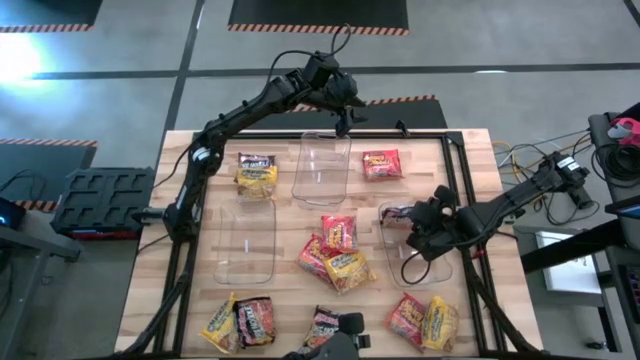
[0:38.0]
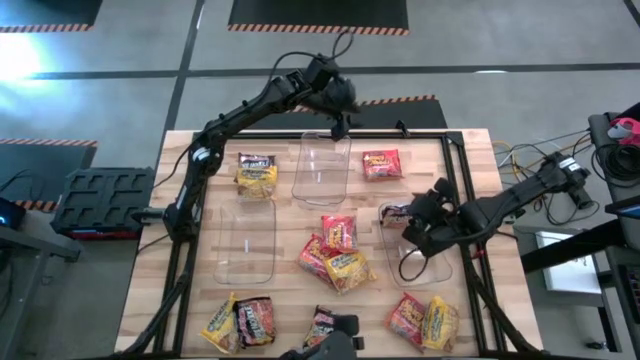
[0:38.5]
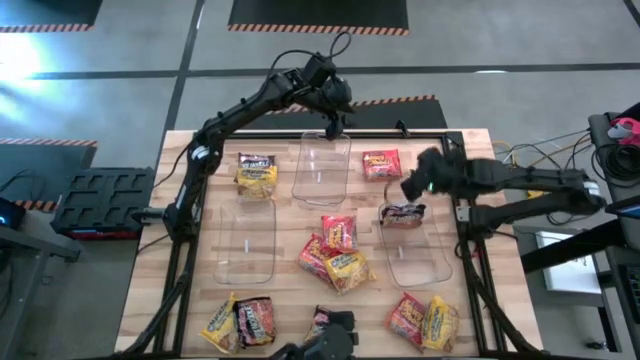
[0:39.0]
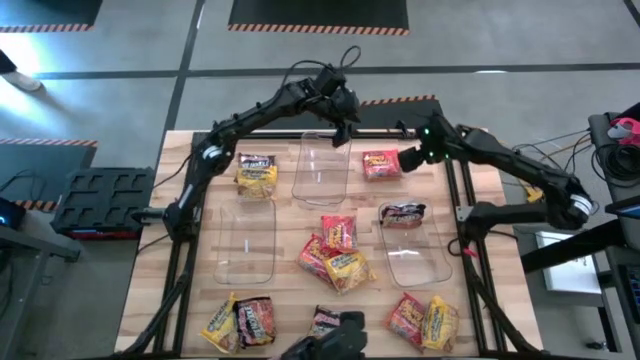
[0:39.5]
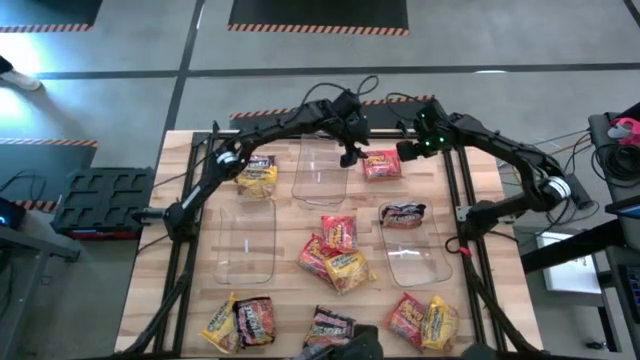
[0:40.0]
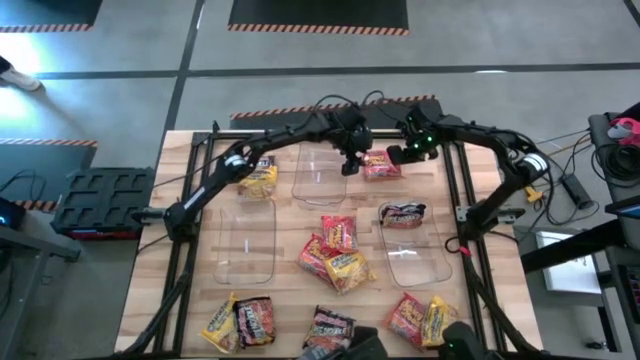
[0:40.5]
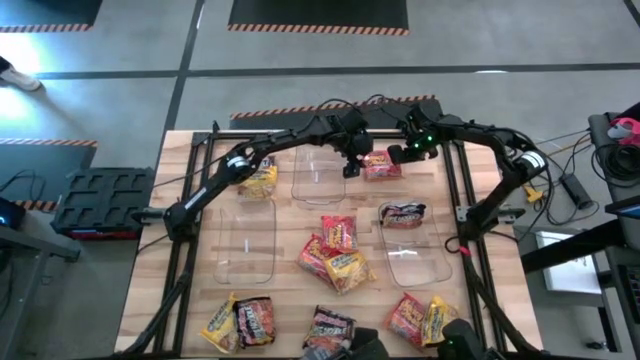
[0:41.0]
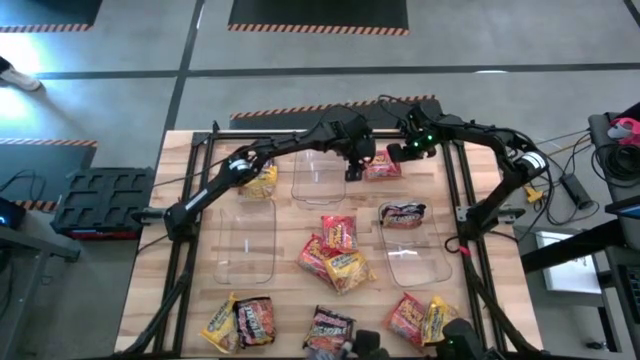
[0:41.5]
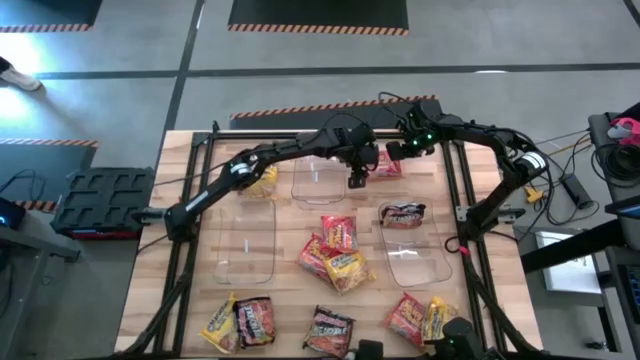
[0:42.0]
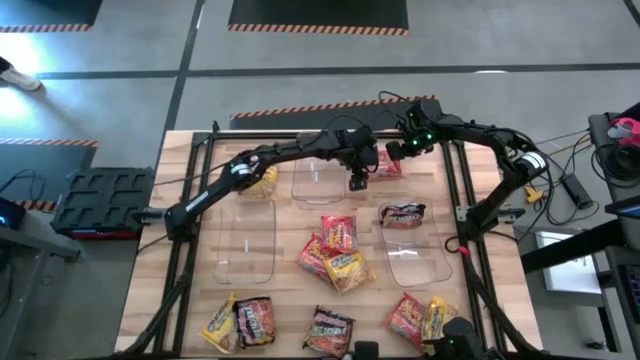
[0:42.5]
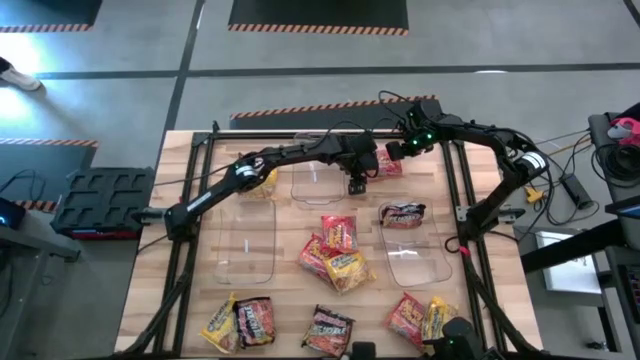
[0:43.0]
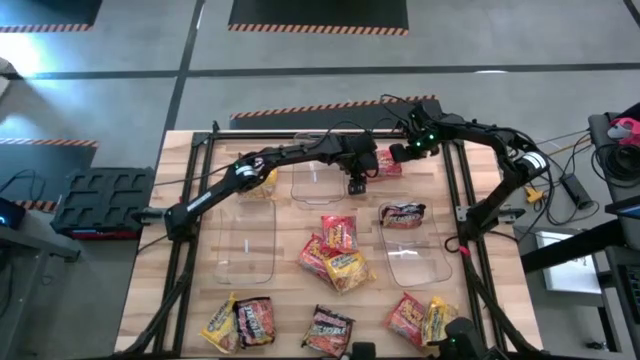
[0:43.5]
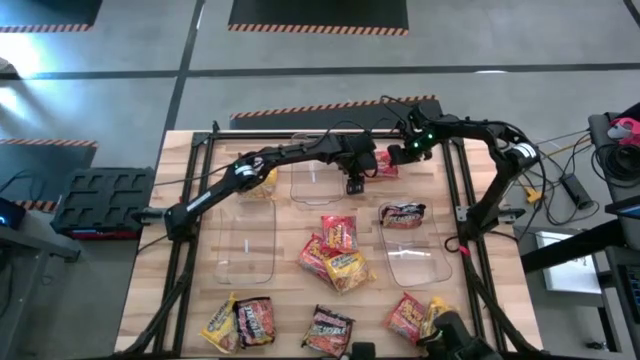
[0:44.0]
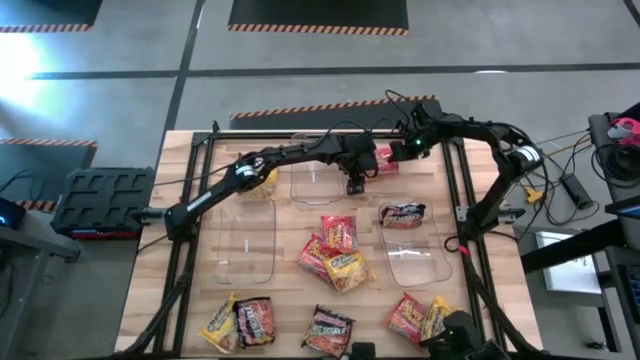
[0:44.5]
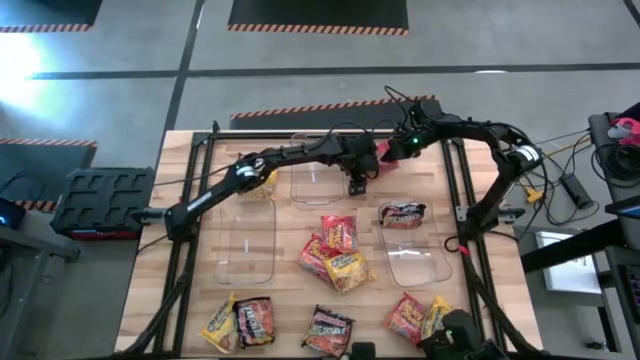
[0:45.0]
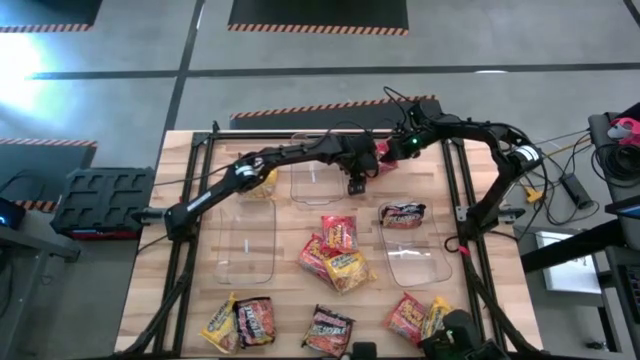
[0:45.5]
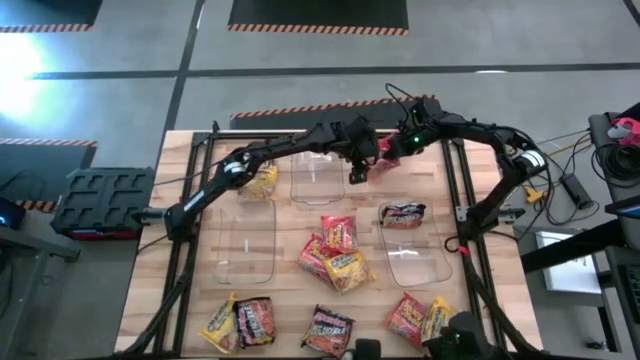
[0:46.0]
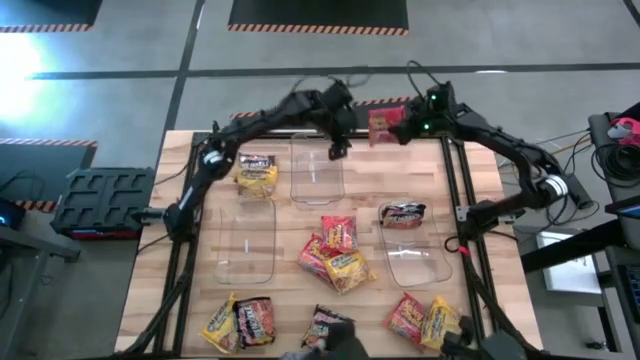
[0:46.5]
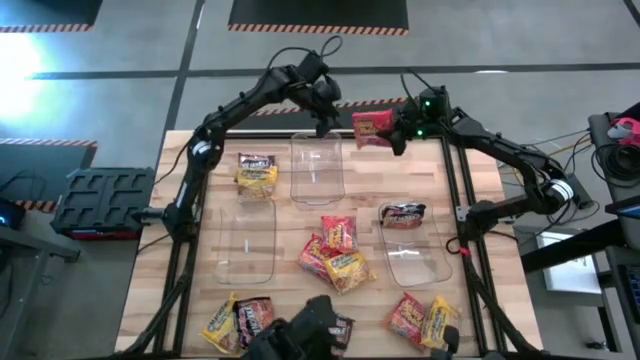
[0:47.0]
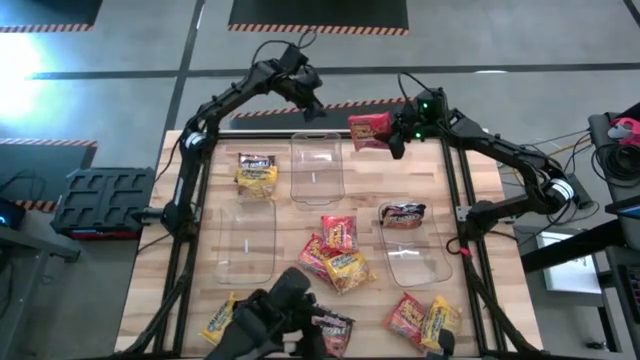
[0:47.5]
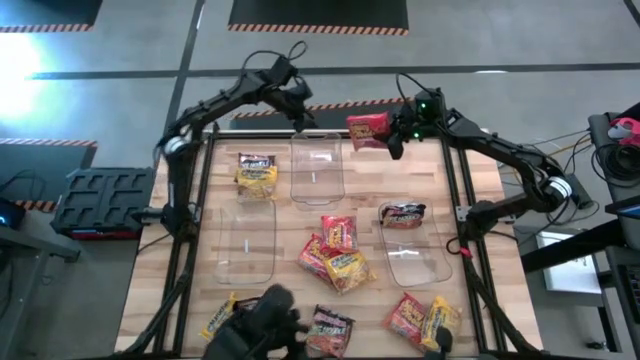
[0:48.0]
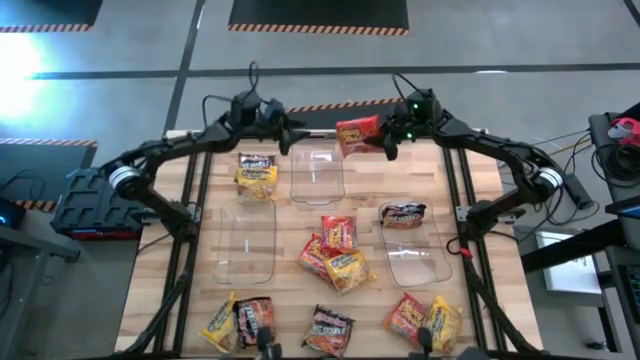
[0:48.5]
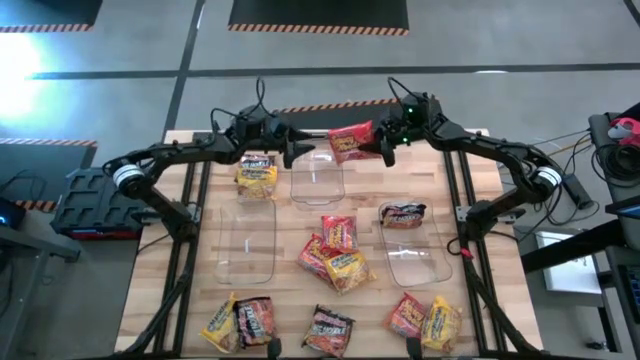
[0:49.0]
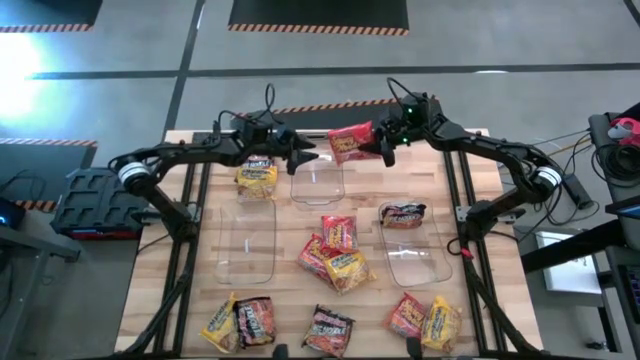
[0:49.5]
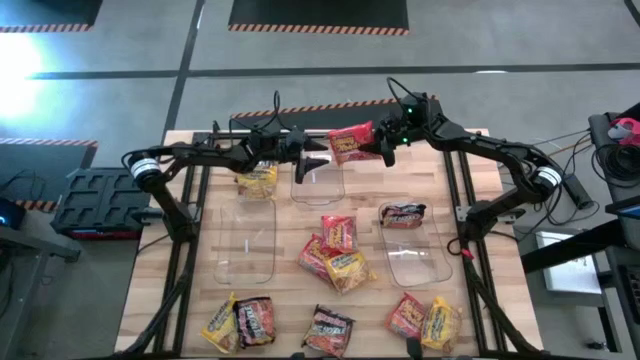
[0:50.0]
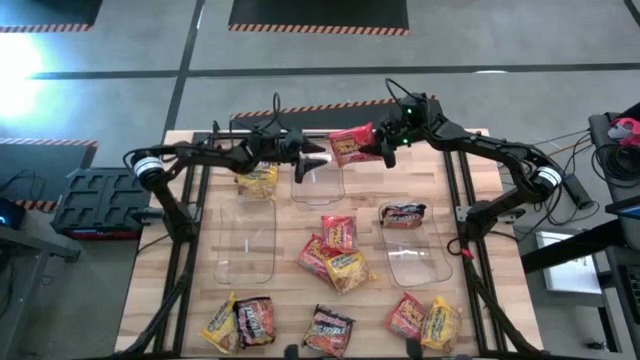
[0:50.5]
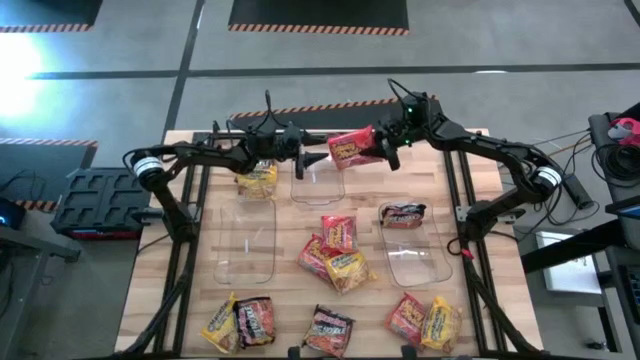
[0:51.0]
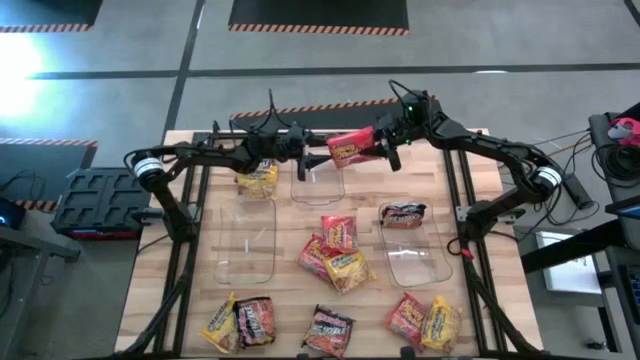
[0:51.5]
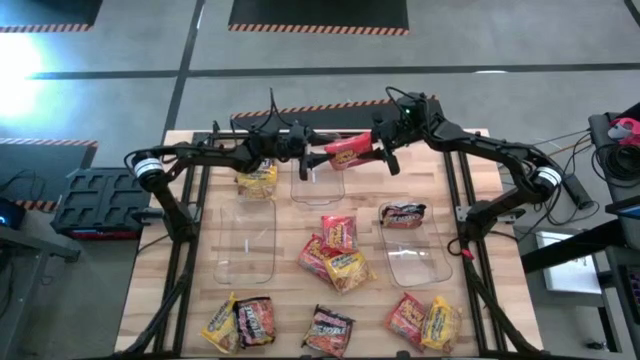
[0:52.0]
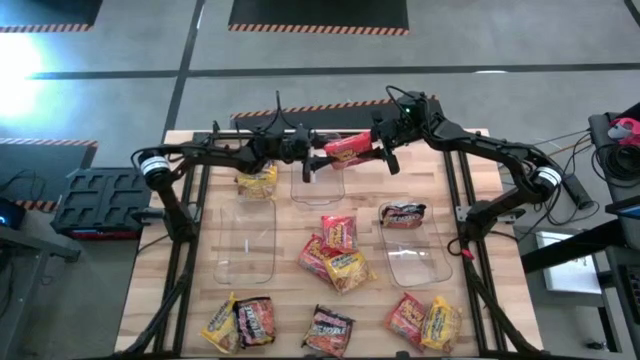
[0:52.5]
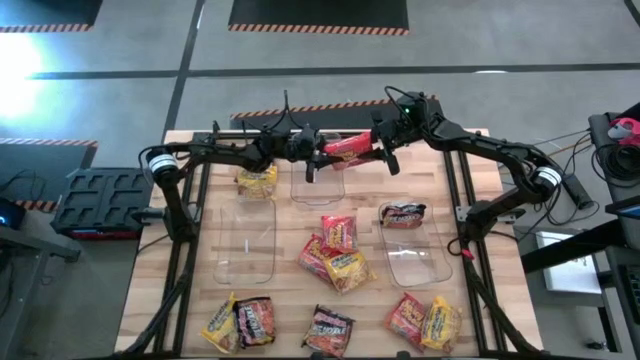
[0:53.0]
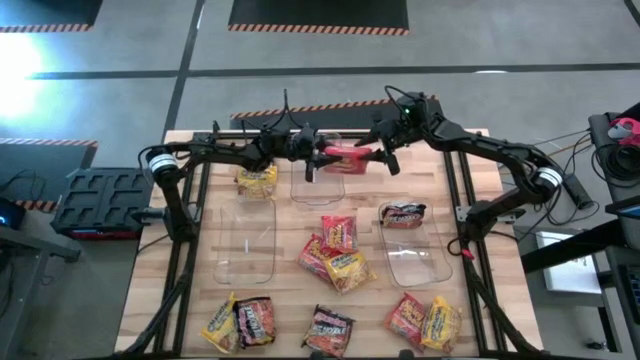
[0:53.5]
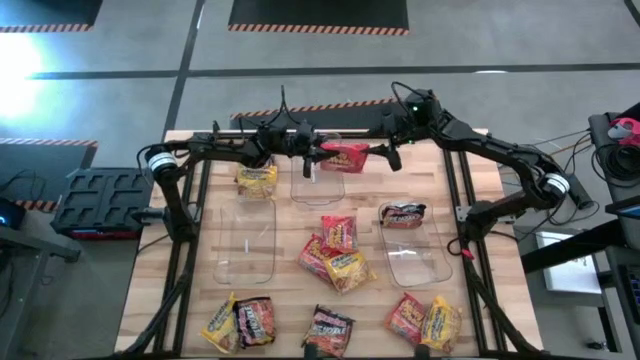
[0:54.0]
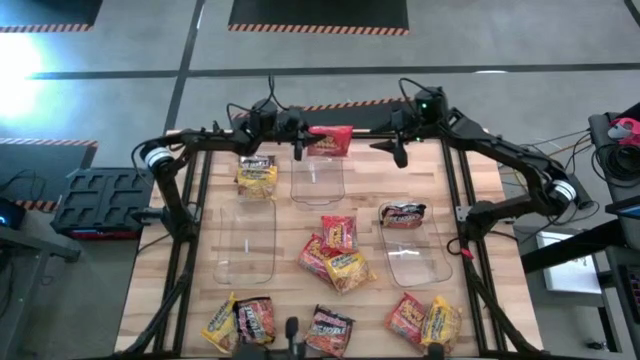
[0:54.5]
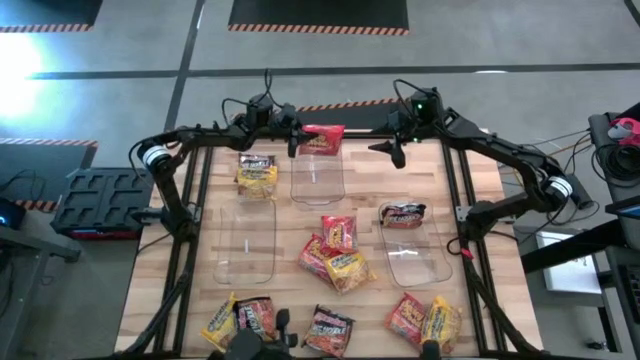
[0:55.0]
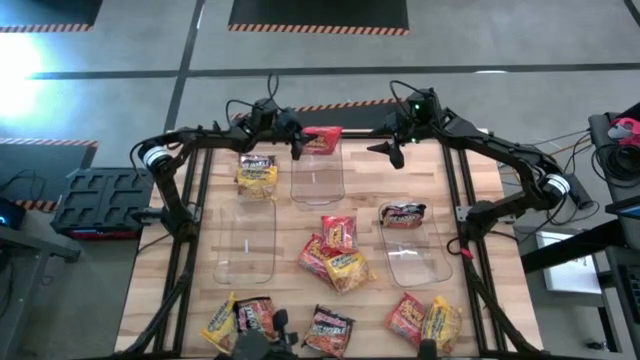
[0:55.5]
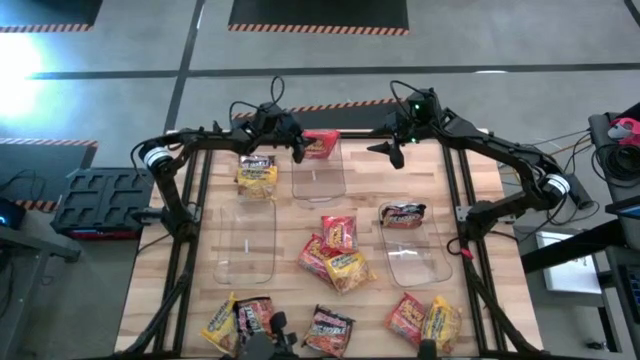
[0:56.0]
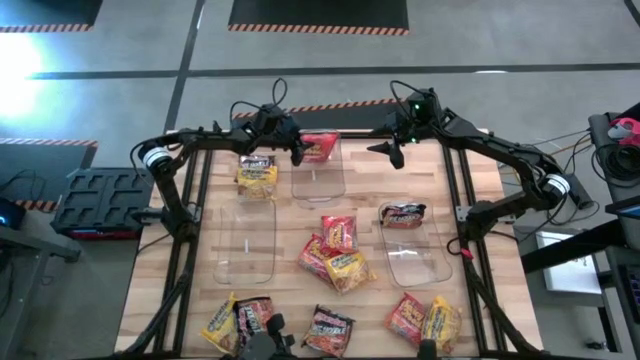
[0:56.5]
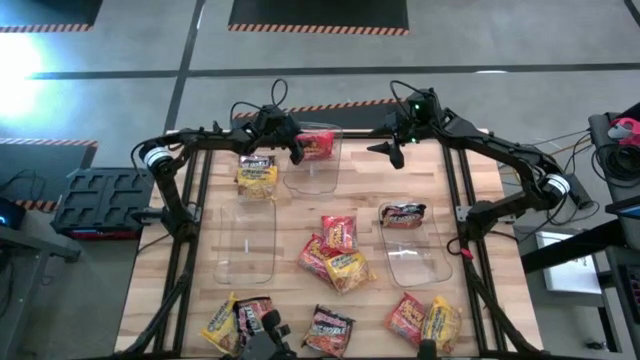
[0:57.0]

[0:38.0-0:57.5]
Task: Sort Maruchan noodles
Put the top right orange pack noodle into the top transparent bin

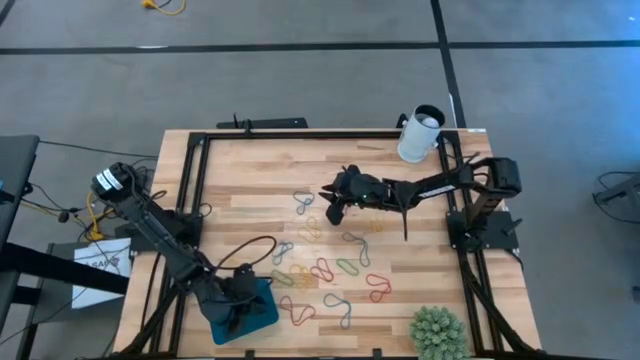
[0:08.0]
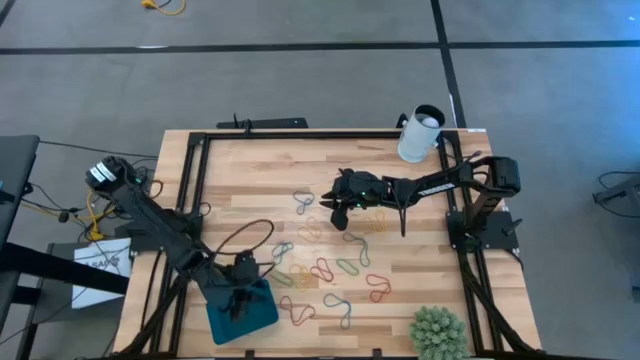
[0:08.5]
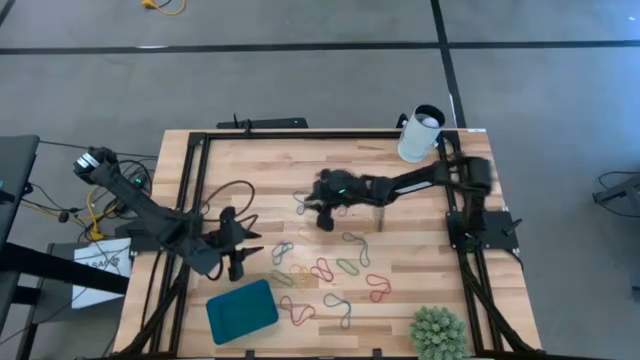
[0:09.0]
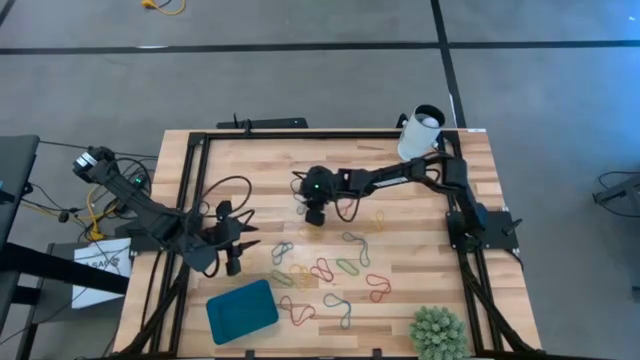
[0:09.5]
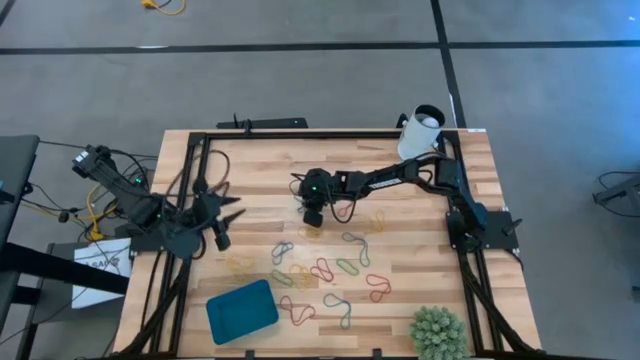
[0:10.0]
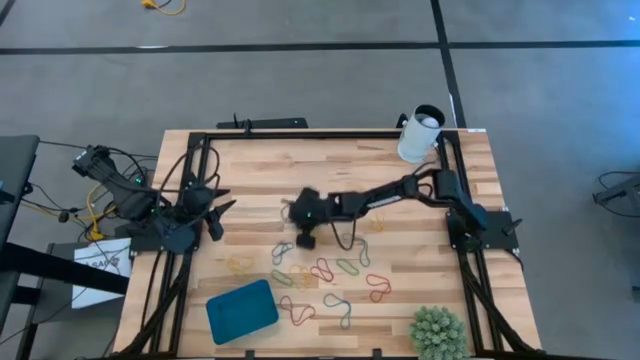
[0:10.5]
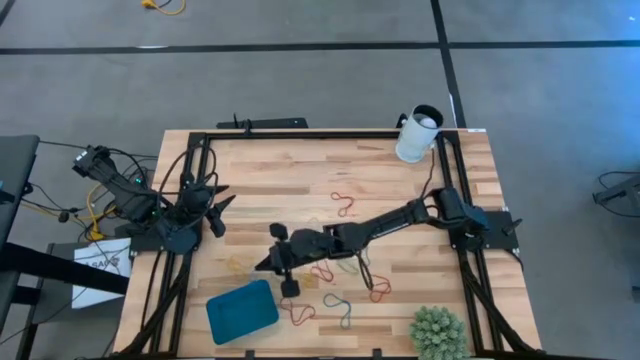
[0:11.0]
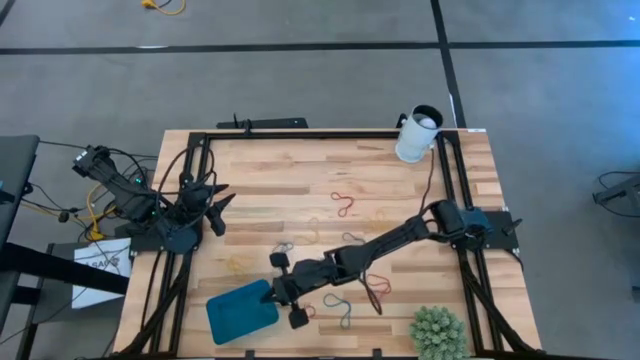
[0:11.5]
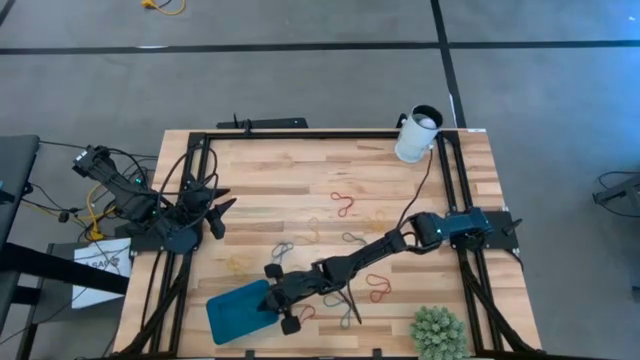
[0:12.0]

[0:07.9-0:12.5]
Task: Pick and place items into bin
Put the blue rubber band into the blue bin
